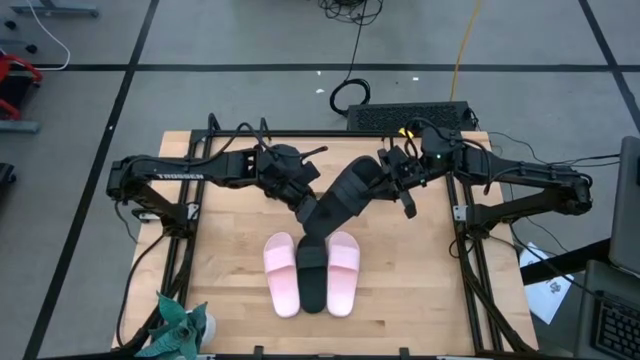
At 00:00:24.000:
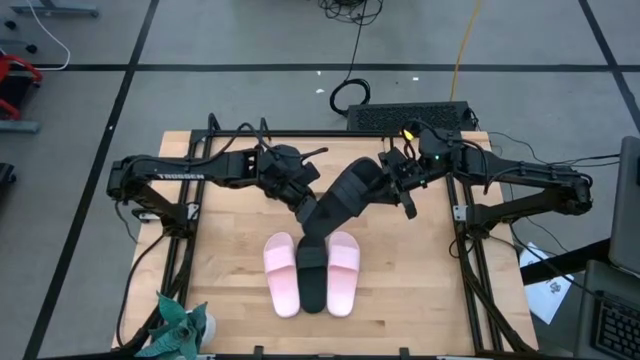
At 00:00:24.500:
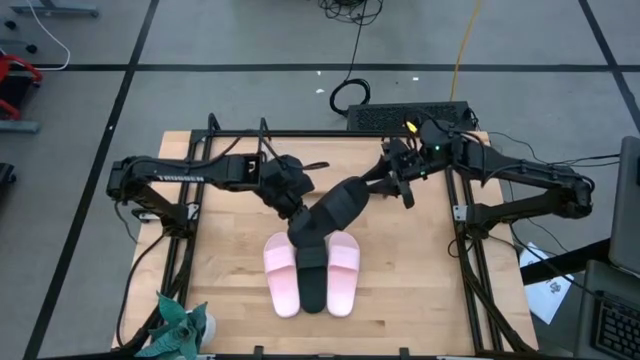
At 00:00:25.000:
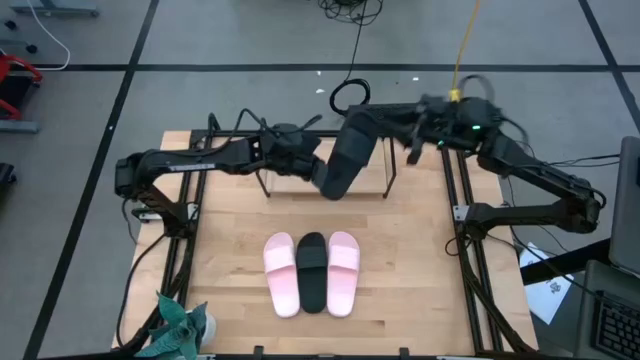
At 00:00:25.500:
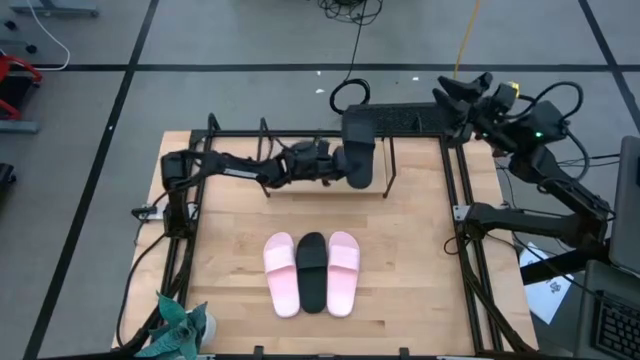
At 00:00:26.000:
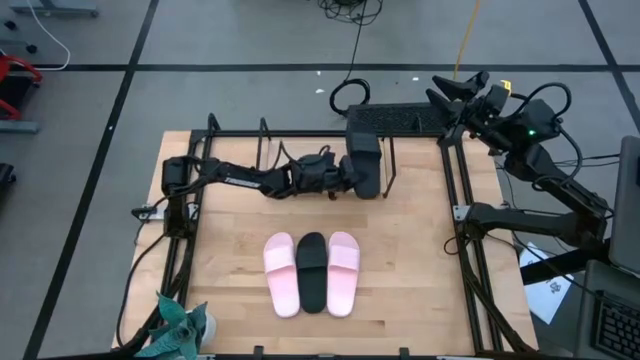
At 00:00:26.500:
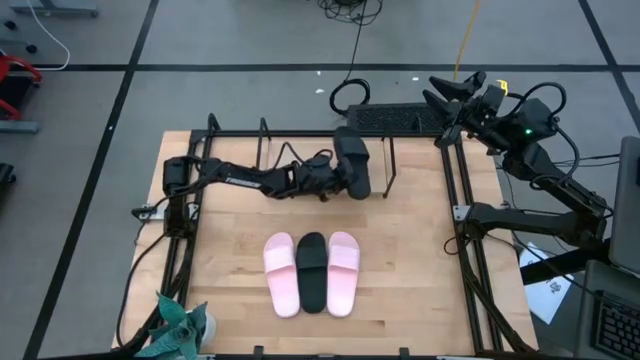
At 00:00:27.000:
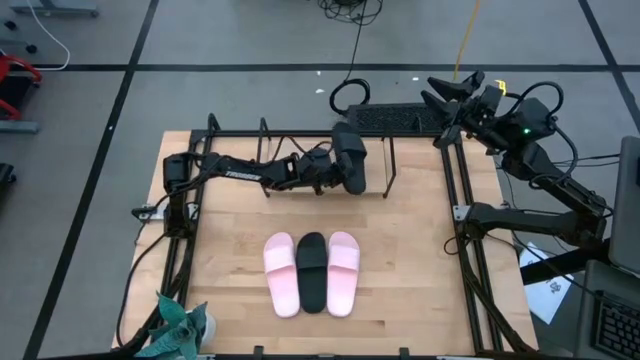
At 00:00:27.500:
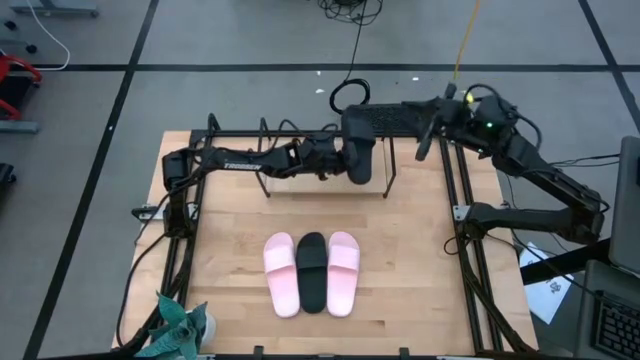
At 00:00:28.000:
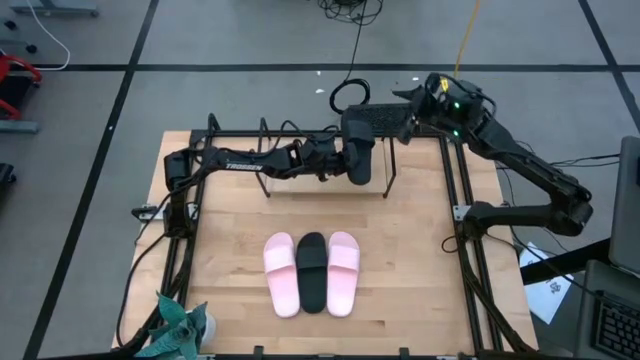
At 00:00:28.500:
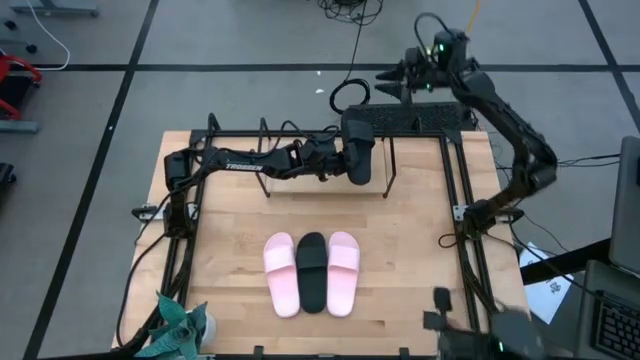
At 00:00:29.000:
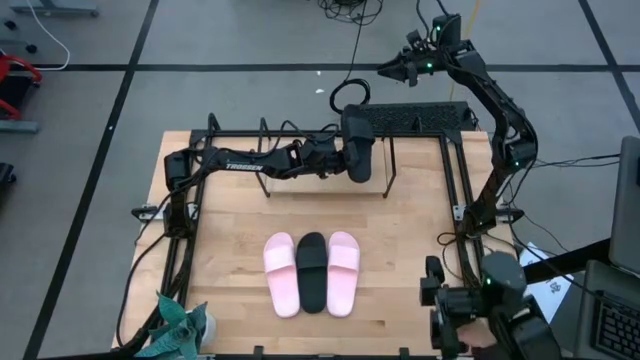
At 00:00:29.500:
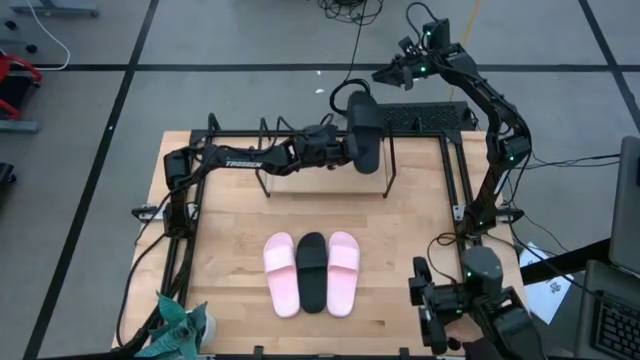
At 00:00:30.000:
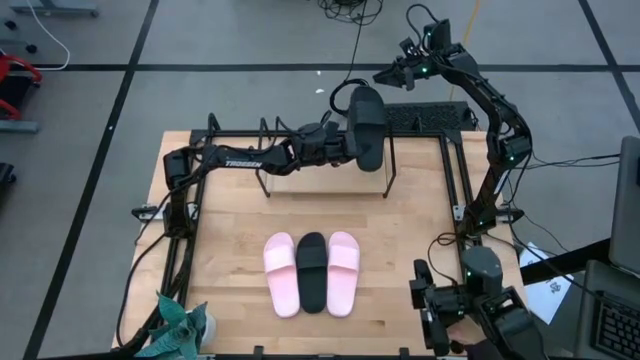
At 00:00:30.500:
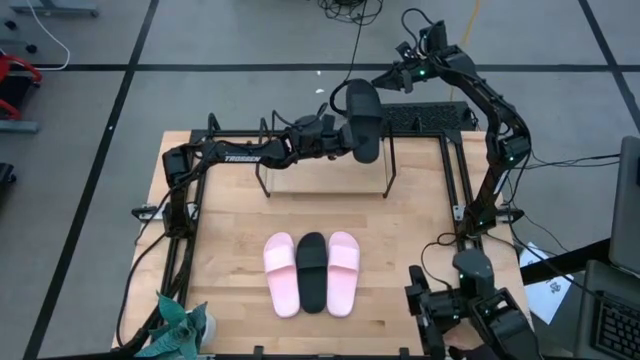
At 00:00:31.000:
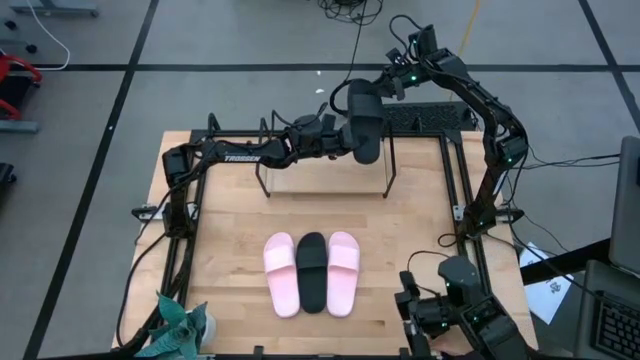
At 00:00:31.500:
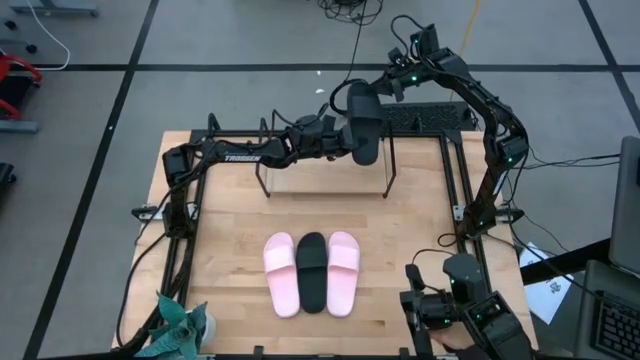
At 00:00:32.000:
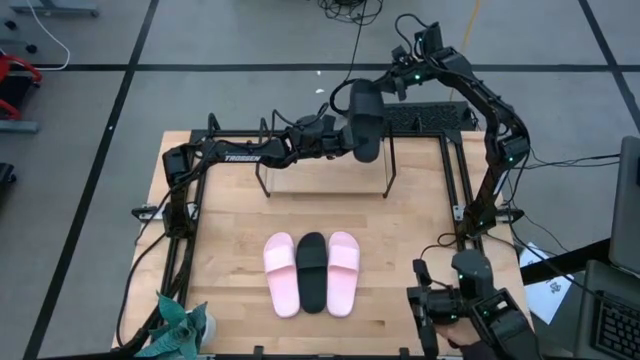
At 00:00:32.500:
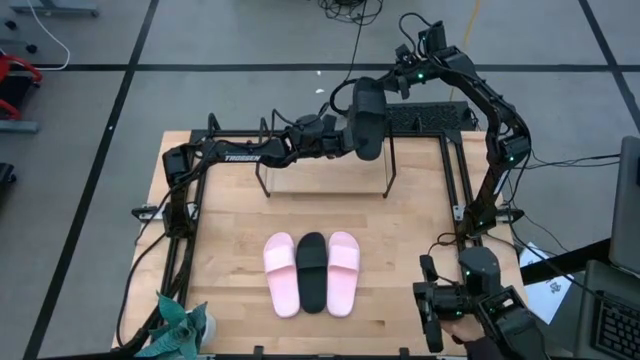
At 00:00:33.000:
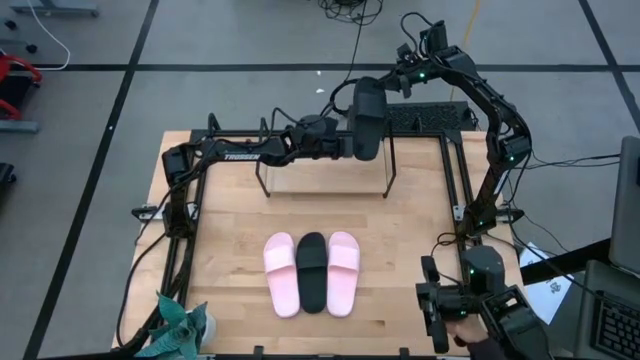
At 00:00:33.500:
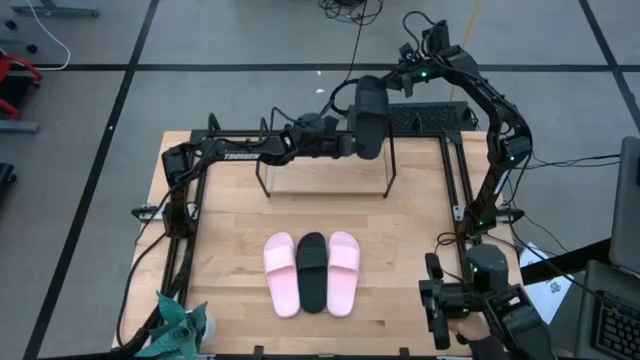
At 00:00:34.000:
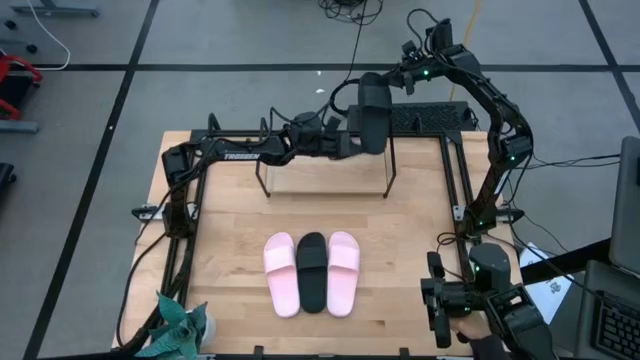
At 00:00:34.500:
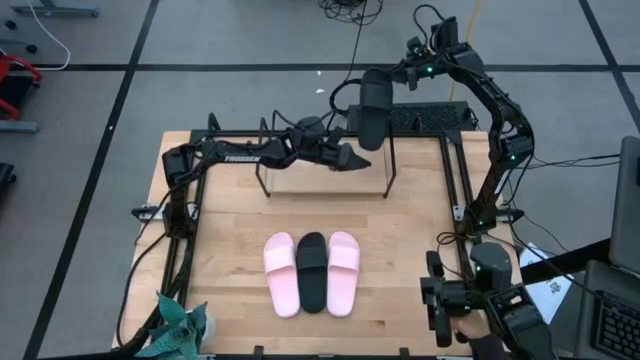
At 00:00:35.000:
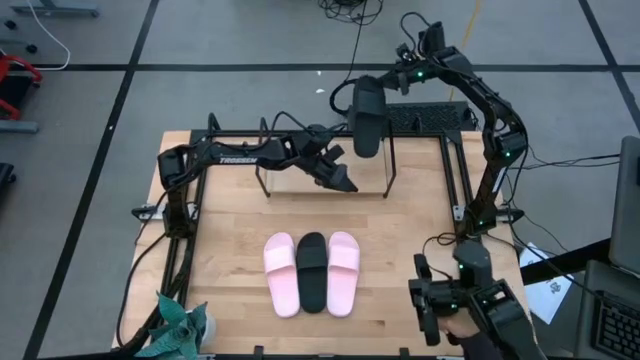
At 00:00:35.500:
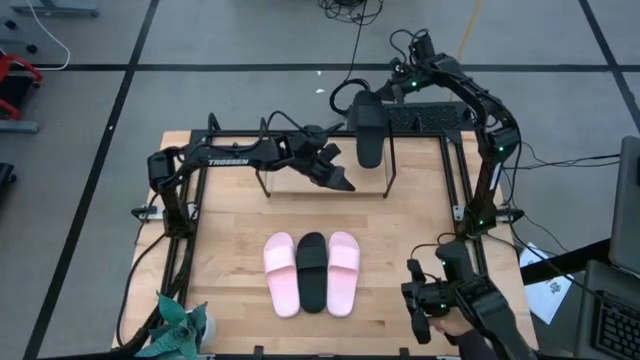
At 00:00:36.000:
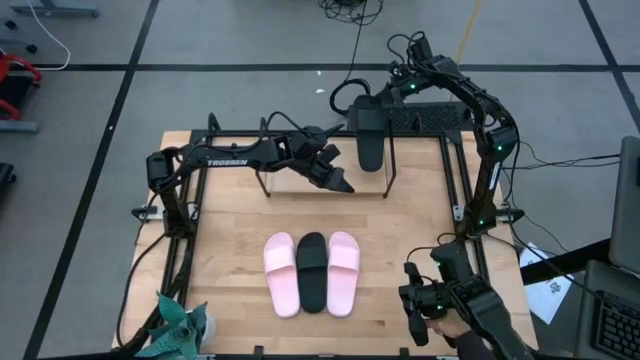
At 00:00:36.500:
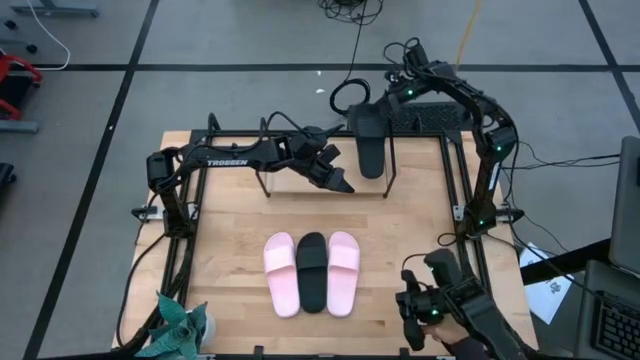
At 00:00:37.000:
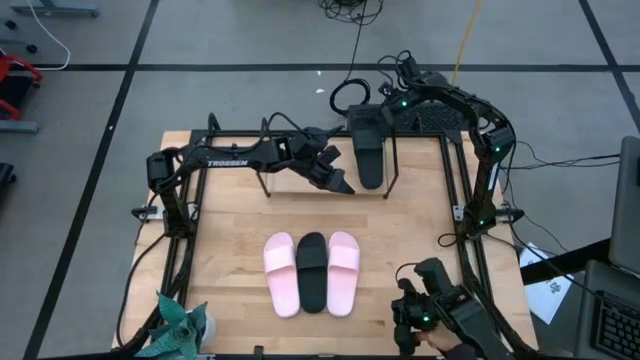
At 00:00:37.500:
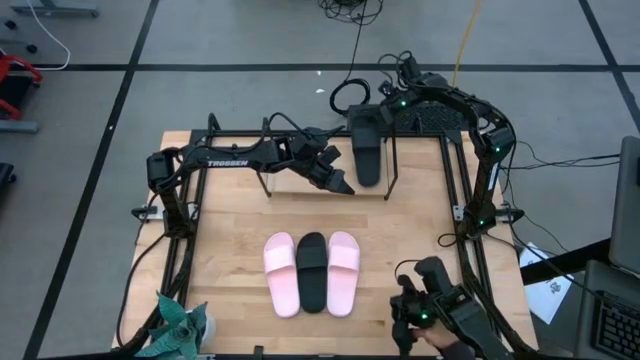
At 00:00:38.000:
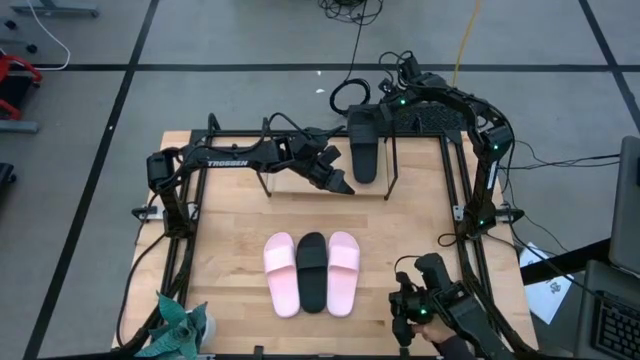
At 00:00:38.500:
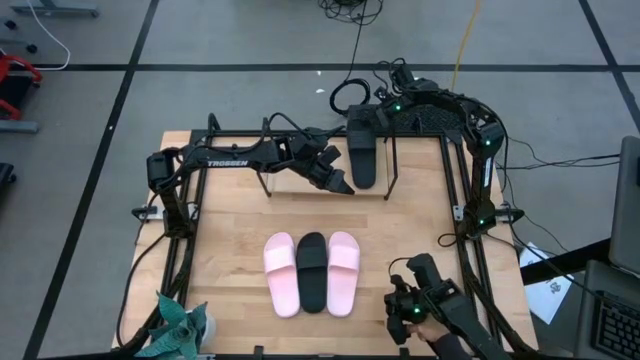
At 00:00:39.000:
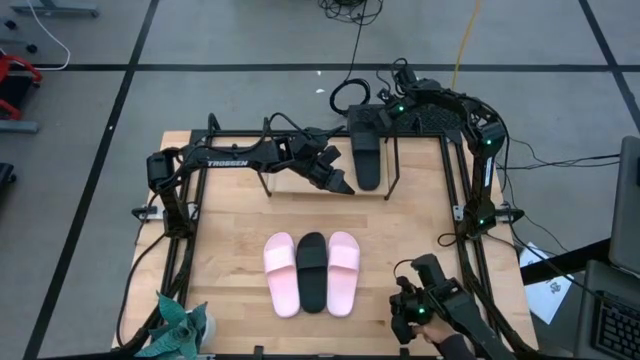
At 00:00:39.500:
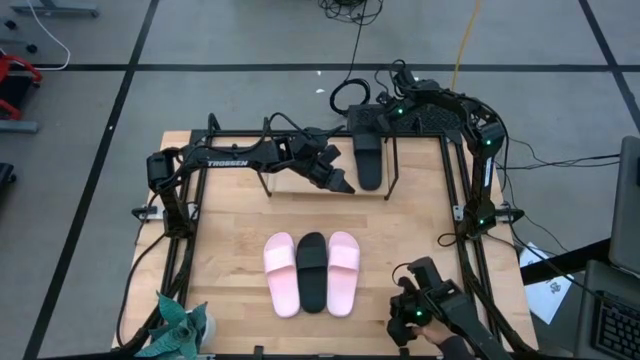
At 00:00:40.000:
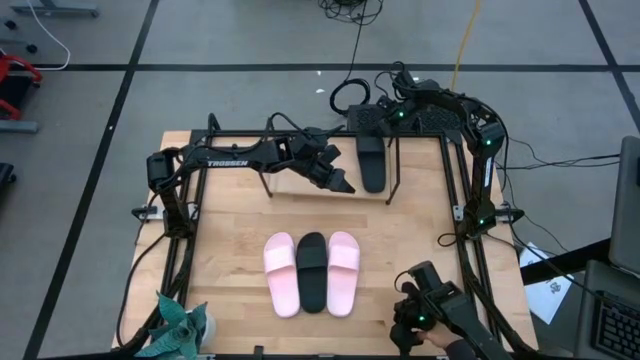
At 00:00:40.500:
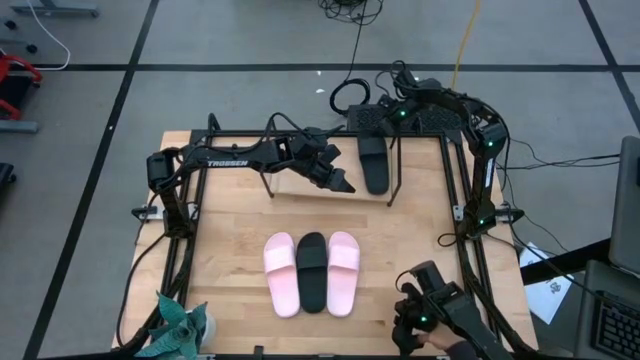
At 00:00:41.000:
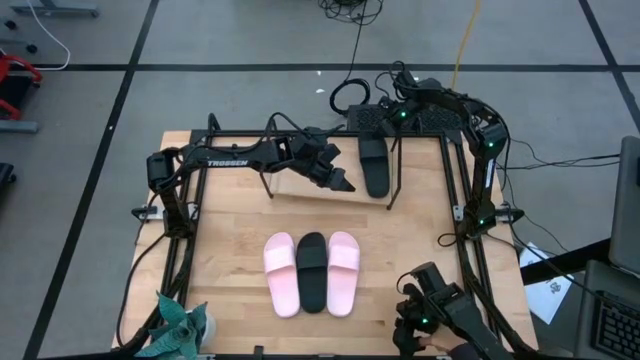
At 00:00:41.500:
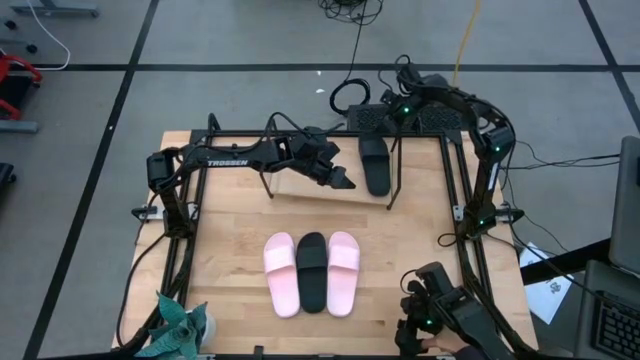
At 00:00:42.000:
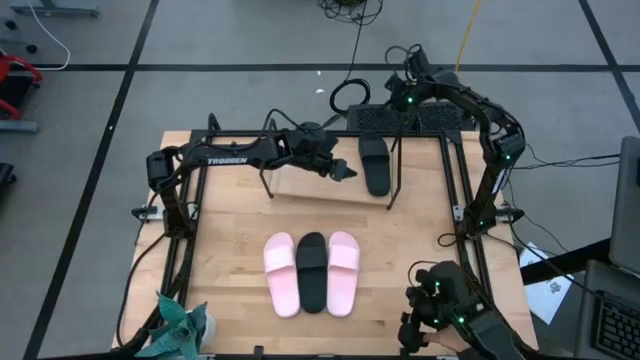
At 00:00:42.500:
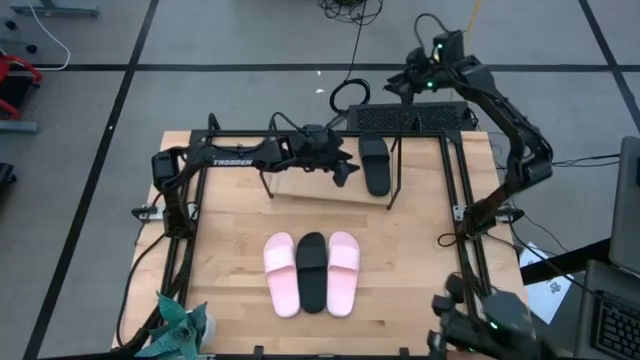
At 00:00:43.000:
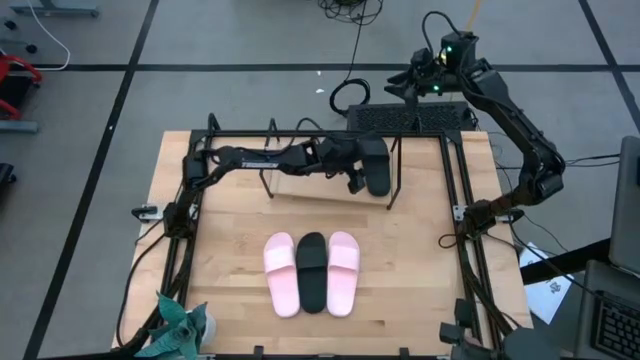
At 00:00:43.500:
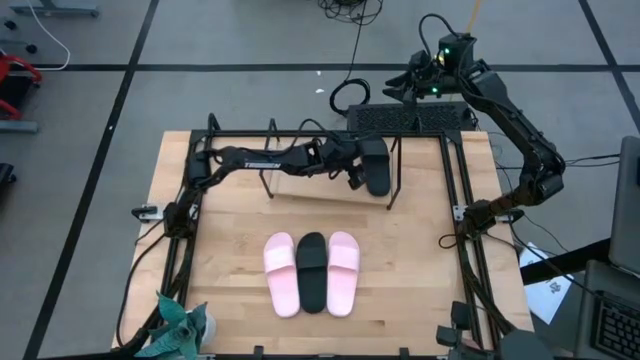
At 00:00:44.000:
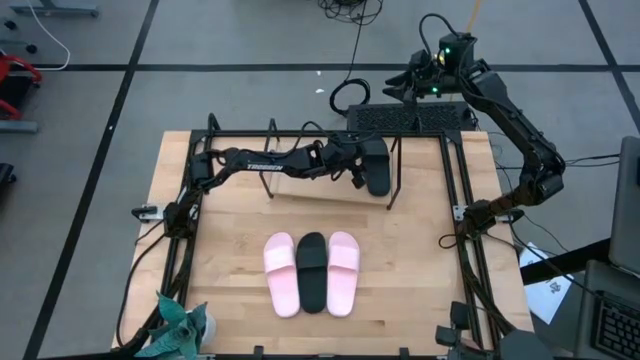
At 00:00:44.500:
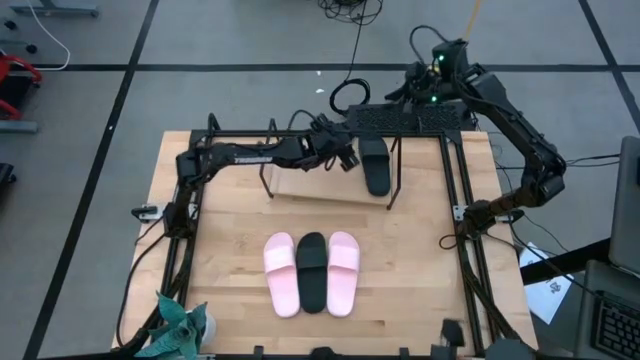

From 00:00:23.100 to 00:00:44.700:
Task: Pick and place slides into the shelf
Put the right black slide on the shelf
